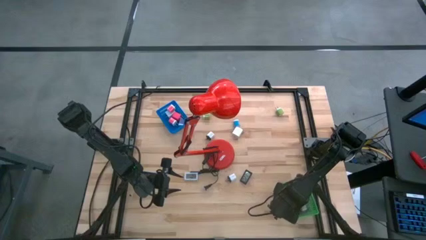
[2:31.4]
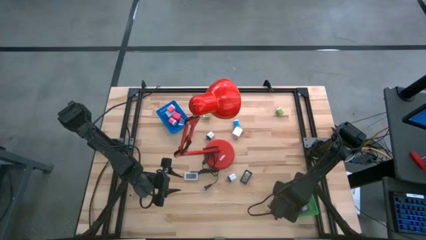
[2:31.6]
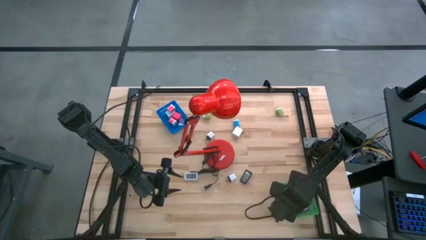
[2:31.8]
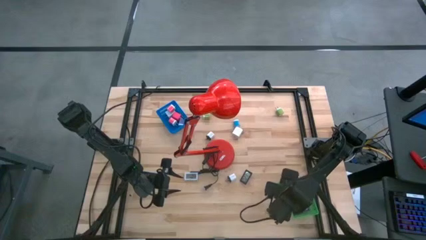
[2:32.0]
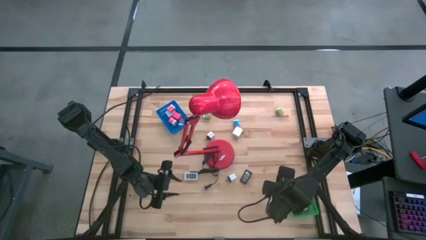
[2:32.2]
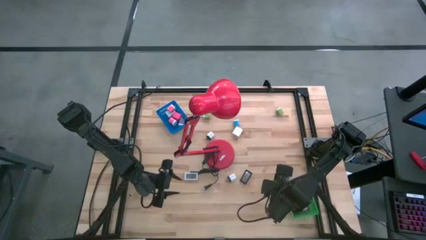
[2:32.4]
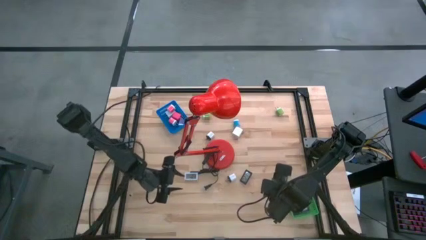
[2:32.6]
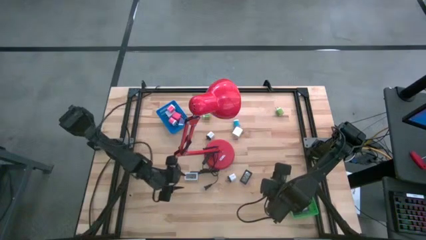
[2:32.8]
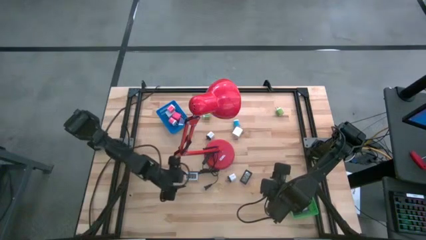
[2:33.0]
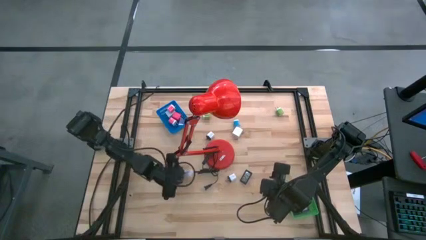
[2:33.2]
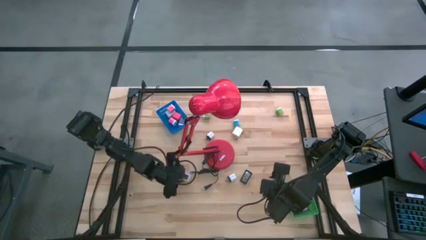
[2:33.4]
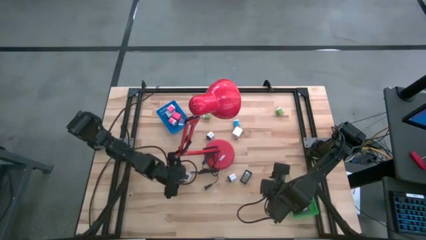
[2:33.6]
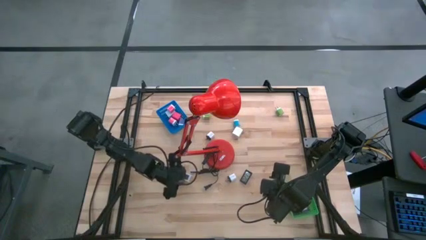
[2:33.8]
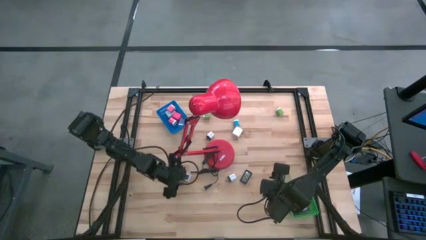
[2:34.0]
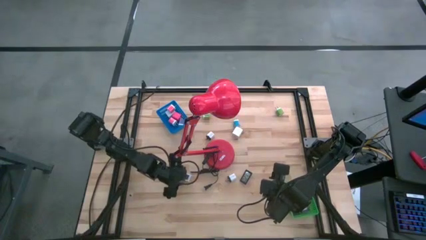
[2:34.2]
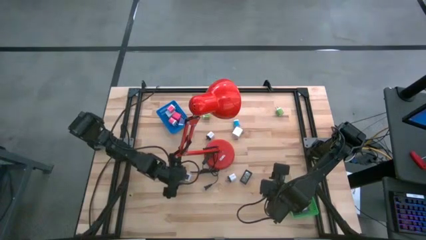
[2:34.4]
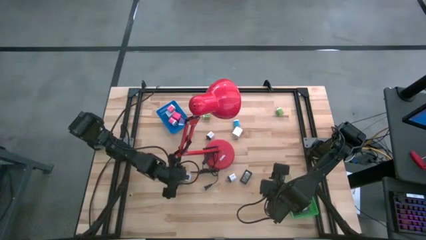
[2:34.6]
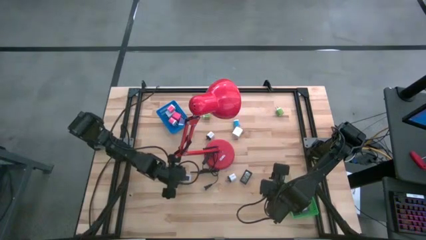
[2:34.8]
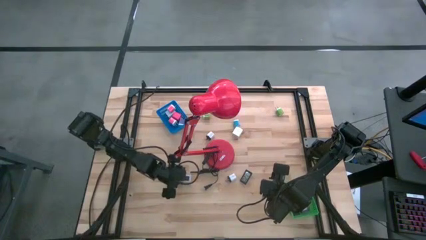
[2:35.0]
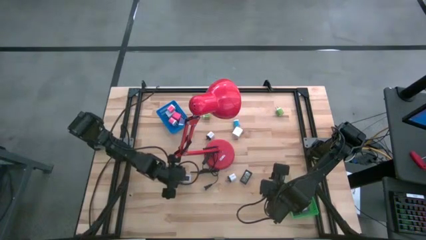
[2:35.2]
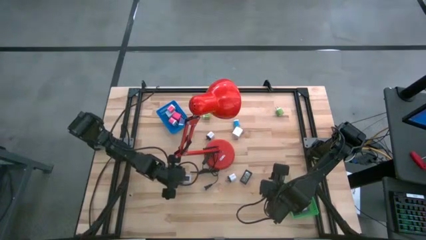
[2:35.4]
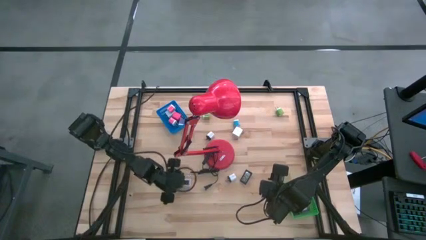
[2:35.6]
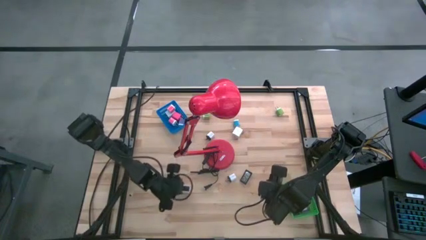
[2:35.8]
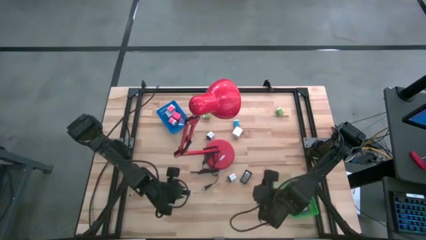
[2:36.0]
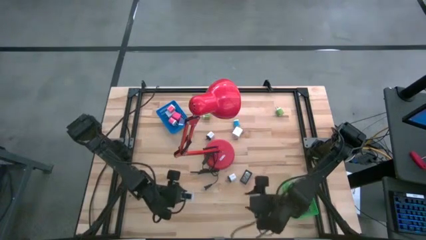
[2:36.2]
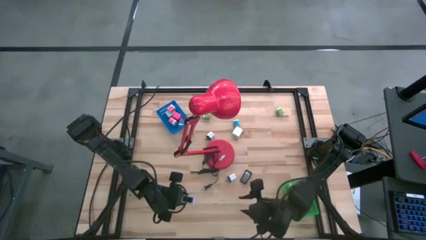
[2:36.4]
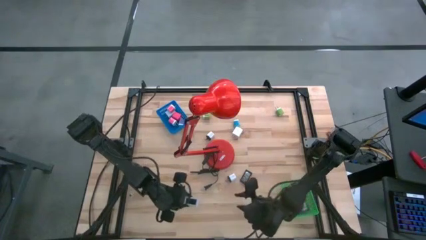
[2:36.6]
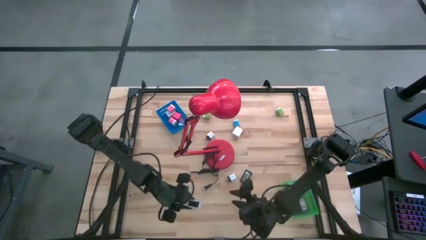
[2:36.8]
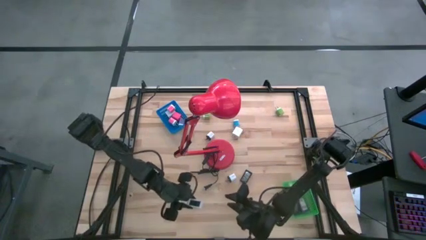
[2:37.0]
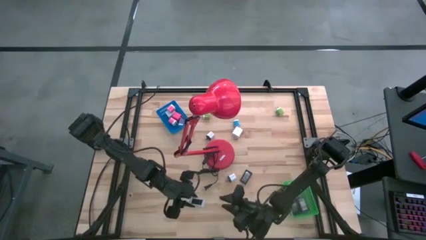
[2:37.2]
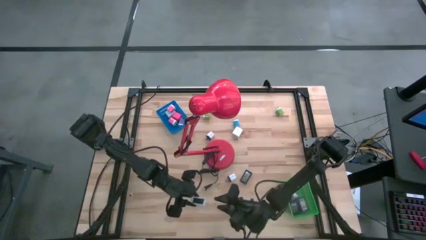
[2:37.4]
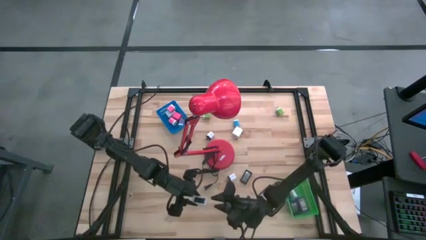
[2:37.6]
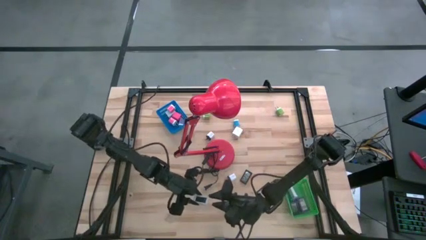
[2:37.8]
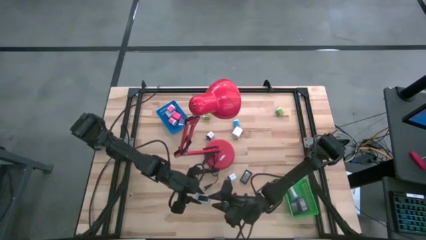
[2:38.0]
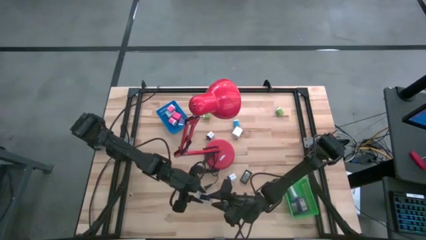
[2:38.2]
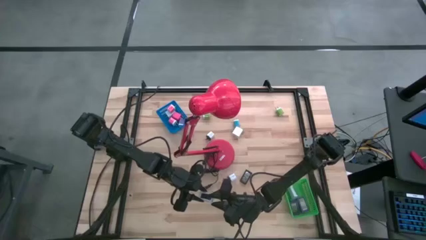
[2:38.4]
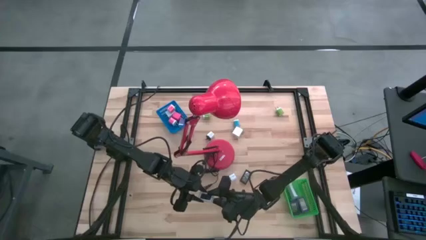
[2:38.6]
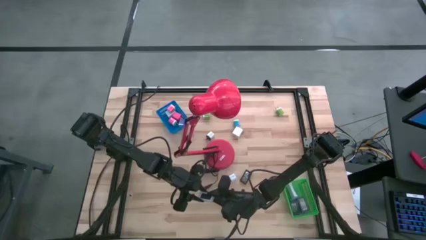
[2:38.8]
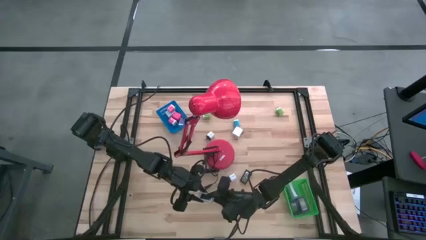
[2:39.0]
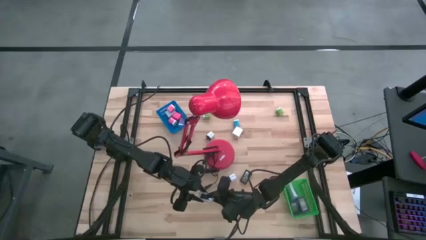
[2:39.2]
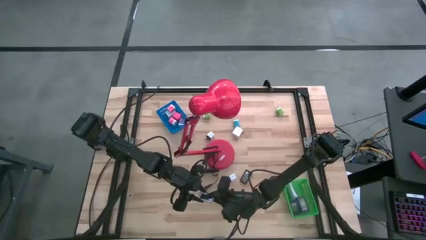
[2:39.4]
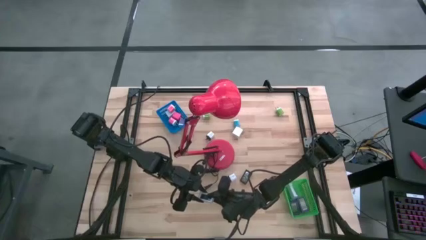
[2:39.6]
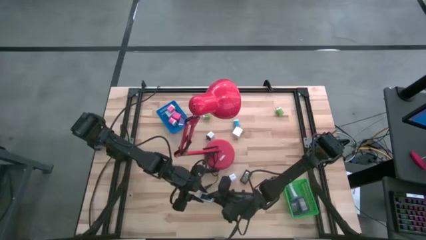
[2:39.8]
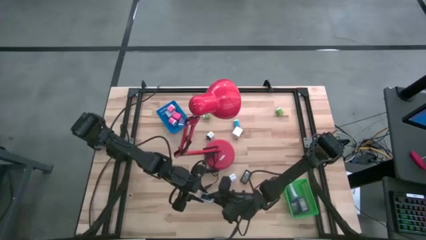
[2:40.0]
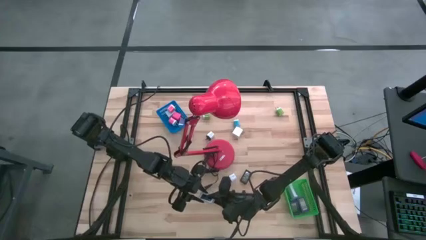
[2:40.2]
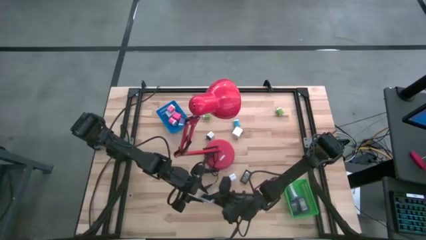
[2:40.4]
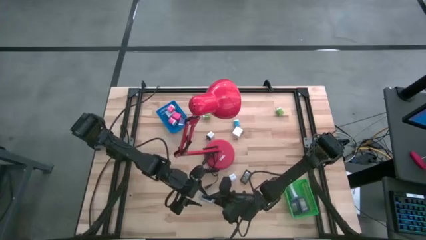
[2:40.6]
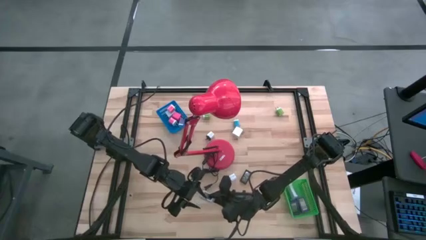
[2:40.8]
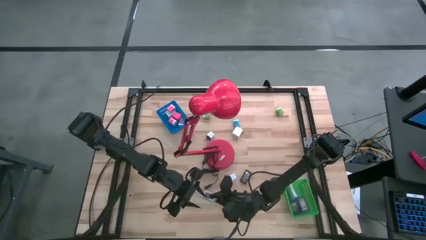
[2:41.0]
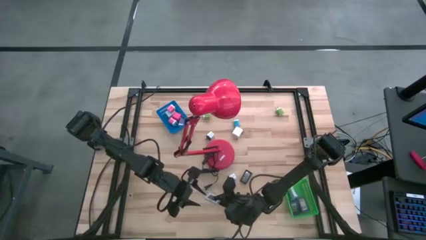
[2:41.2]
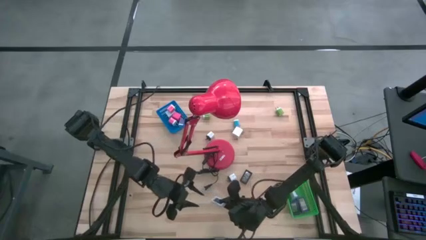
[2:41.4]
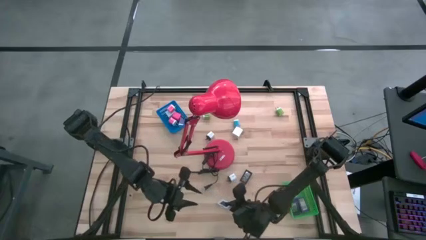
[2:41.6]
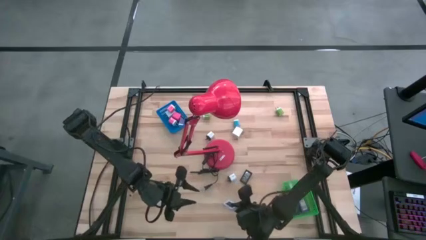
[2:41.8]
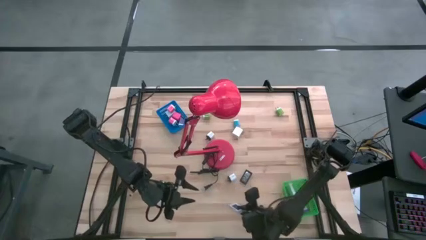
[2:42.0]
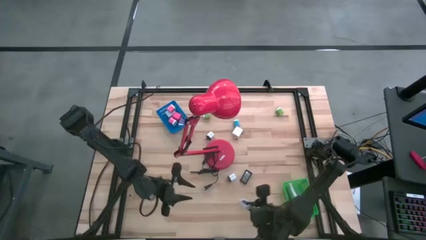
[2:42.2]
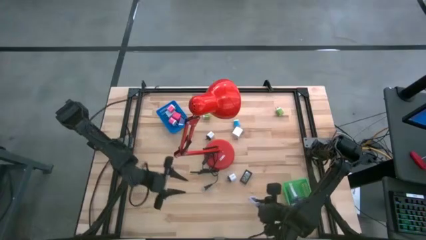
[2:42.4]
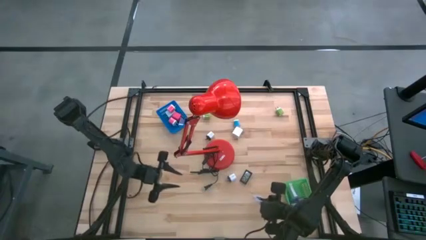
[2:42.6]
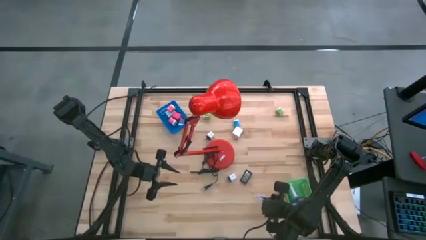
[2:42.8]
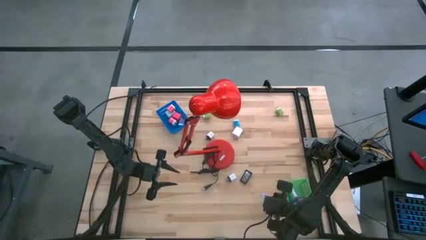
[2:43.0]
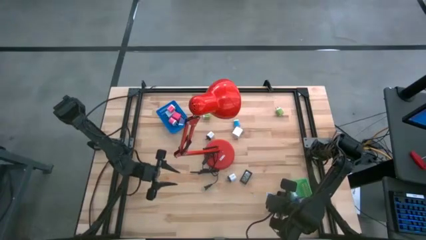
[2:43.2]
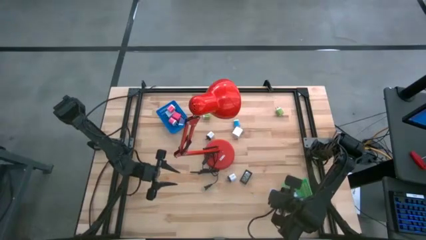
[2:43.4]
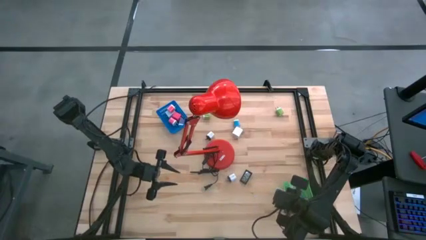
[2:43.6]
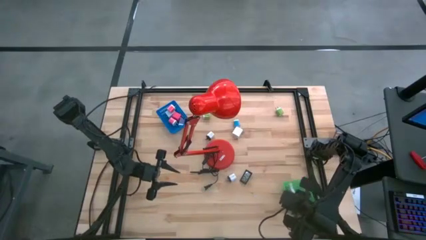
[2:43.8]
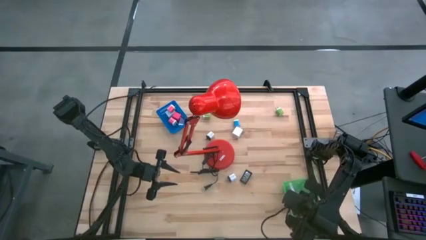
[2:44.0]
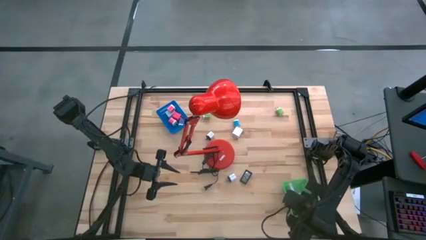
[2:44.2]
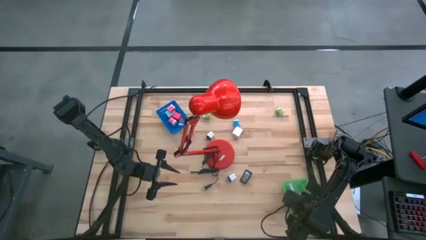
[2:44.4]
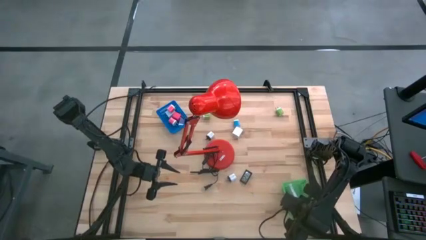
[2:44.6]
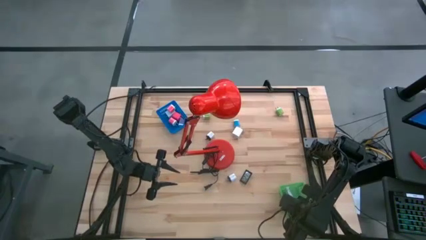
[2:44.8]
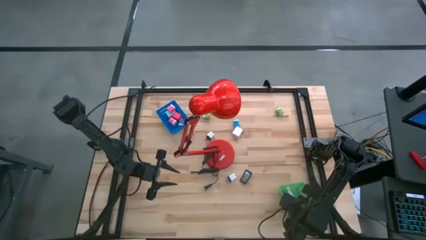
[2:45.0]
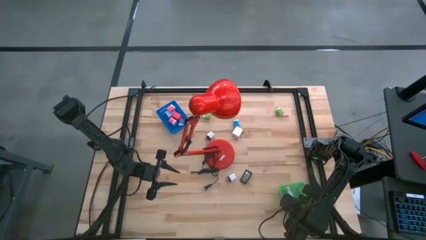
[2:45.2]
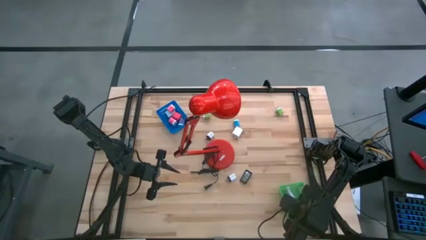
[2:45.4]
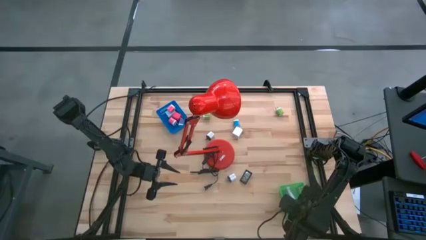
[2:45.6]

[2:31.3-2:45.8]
Task: Pick & Place Office items
Put the white digital clock into the green bin
